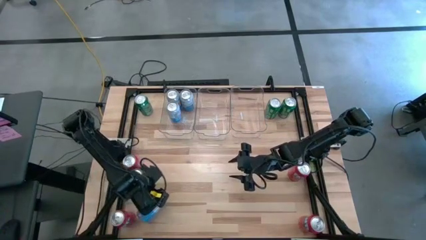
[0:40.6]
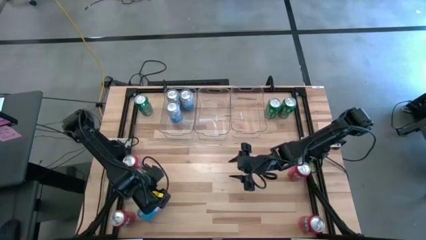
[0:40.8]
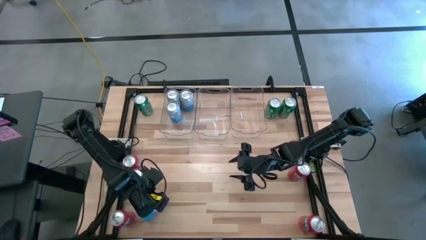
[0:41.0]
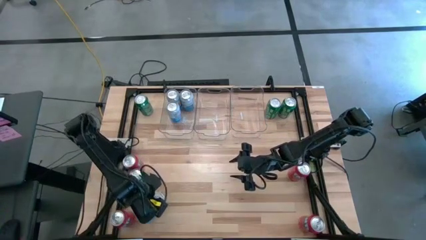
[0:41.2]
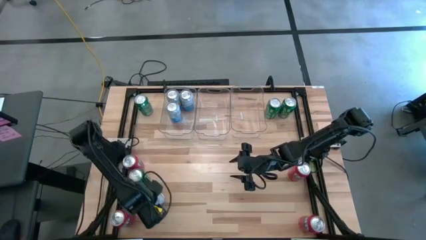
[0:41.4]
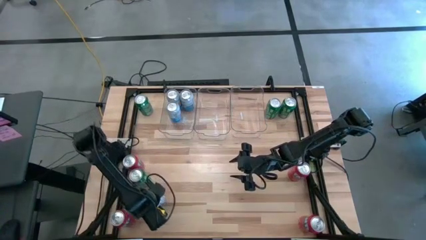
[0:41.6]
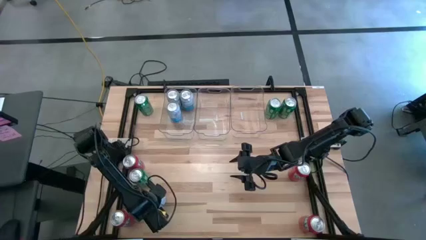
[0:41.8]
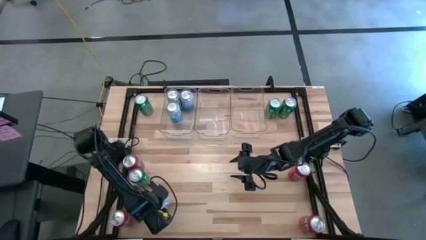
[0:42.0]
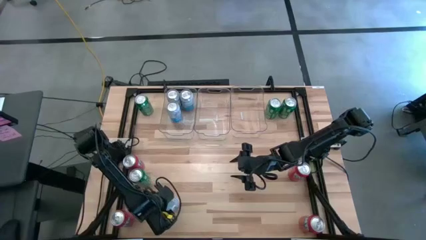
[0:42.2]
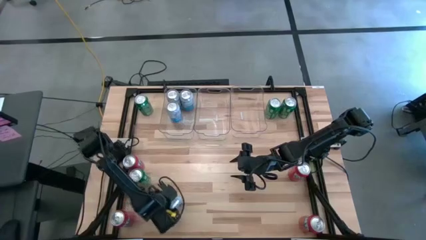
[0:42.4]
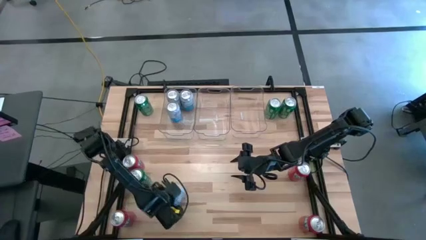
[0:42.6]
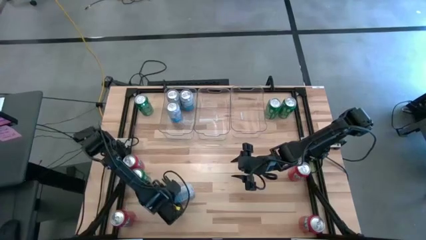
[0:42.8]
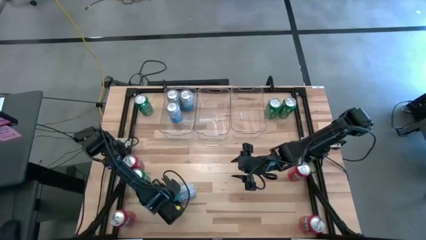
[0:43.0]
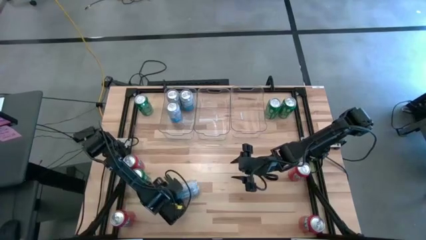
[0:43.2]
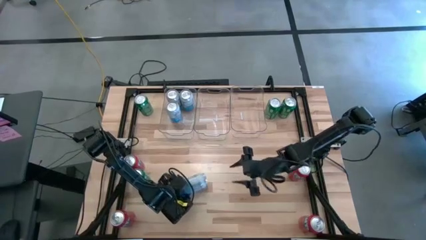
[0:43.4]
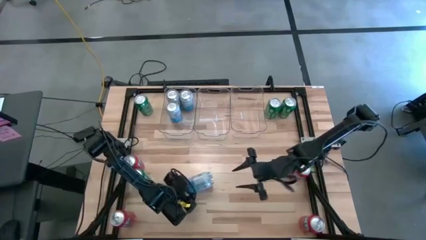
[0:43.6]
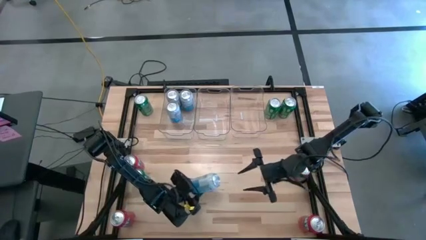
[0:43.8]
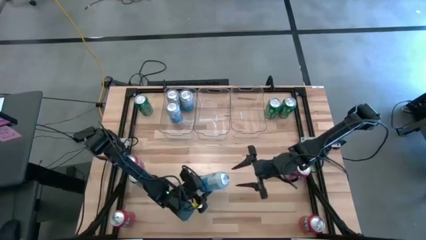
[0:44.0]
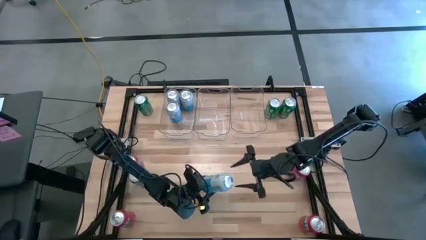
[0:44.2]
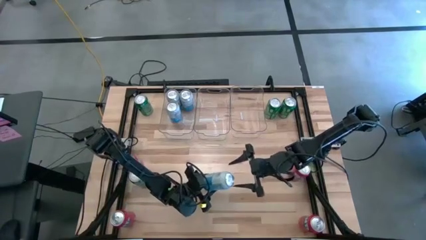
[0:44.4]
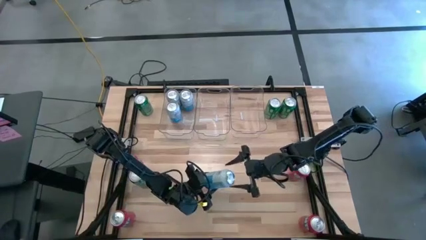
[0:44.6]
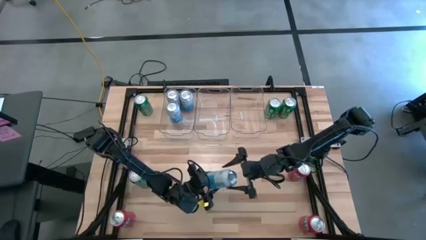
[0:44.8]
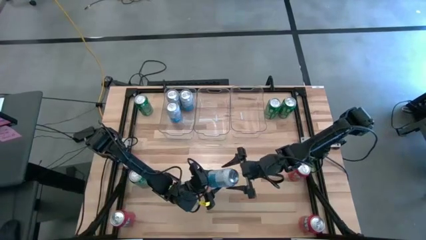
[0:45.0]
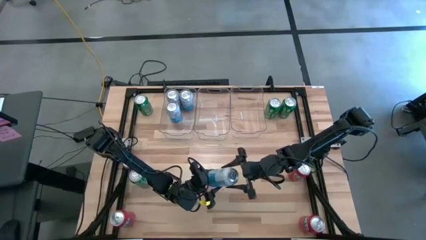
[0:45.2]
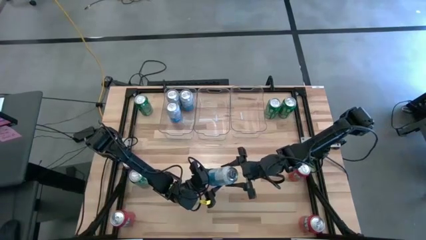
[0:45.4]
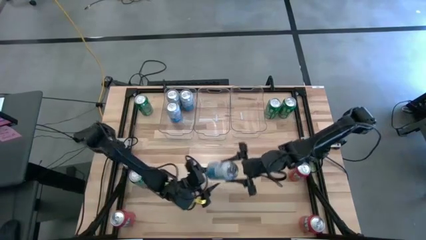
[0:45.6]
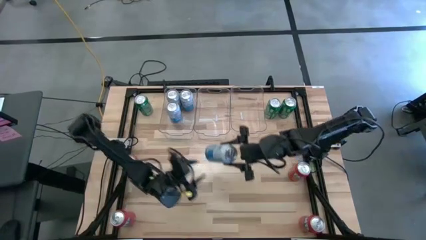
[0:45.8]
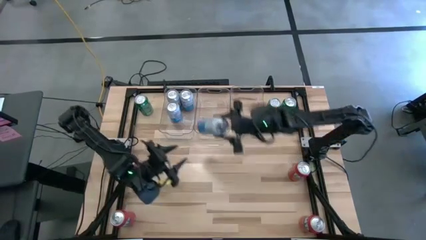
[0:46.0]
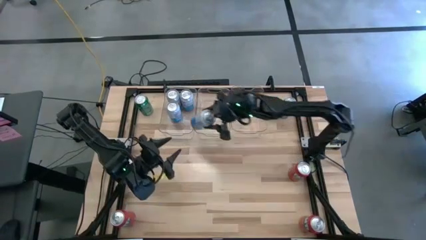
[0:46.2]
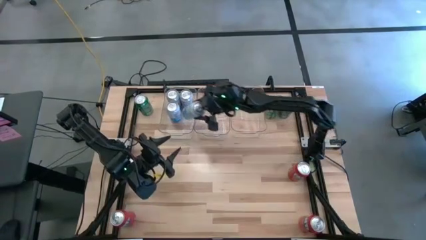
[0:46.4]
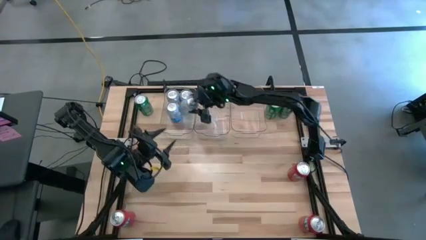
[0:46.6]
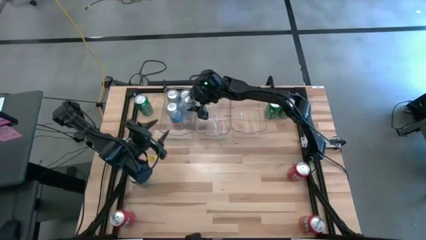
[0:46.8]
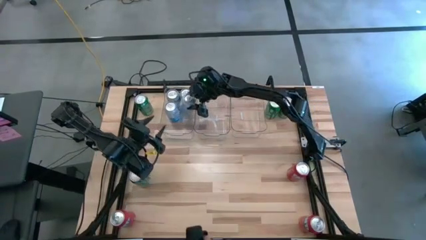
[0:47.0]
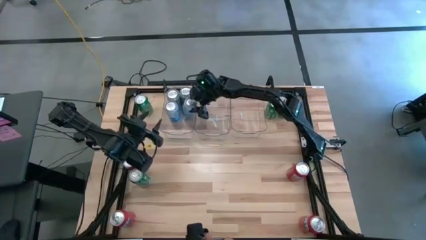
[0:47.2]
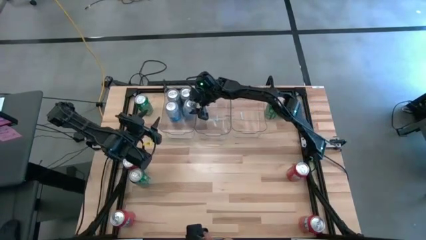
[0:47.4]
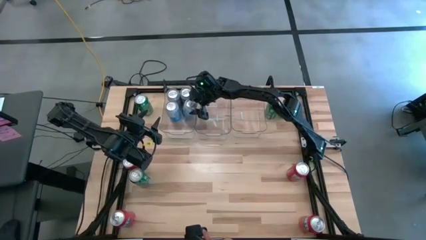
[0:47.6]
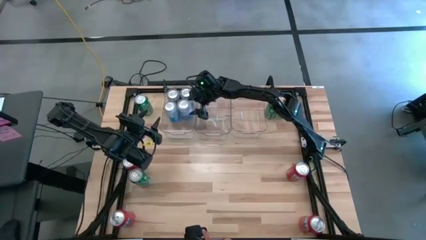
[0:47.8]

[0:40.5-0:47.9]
Task: Sort soda cans
Put the blue-white soda can into the left transparent bin

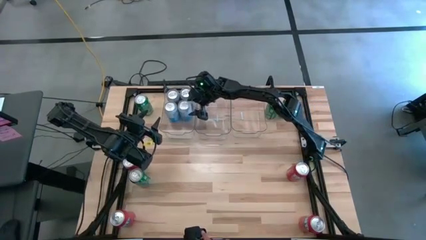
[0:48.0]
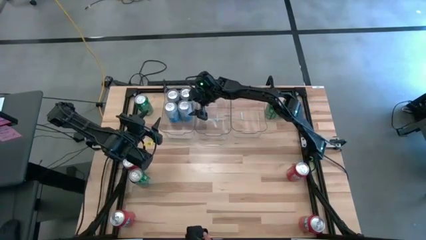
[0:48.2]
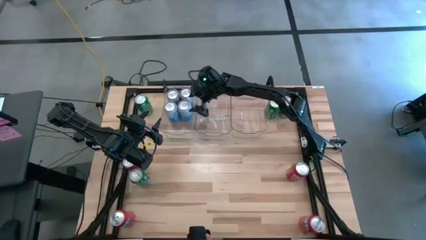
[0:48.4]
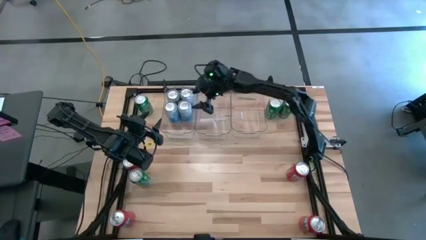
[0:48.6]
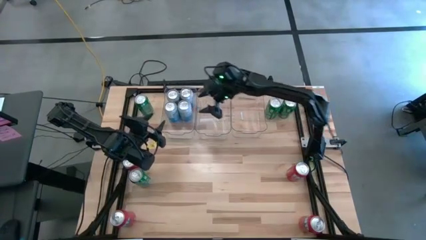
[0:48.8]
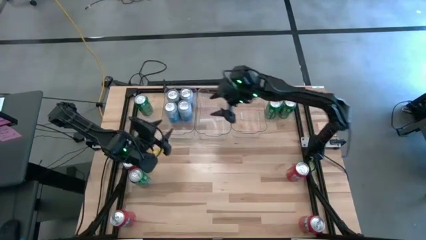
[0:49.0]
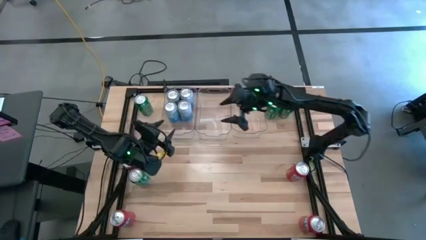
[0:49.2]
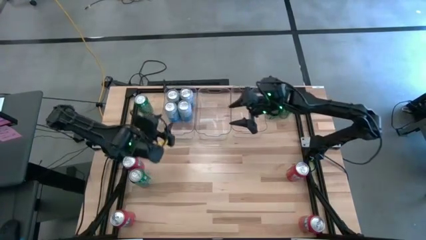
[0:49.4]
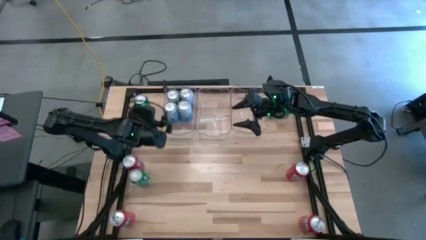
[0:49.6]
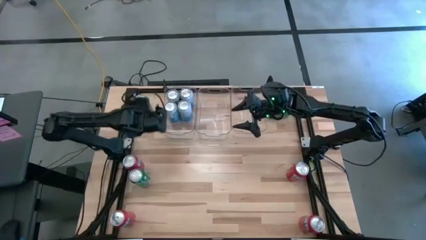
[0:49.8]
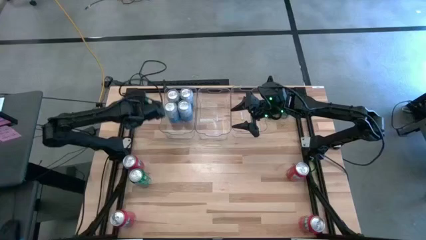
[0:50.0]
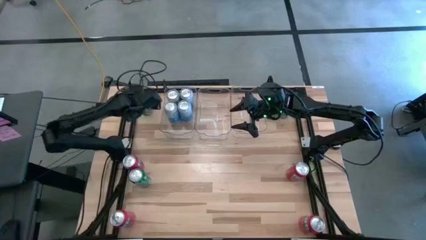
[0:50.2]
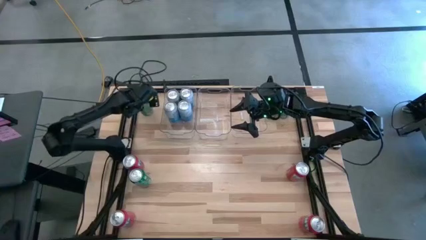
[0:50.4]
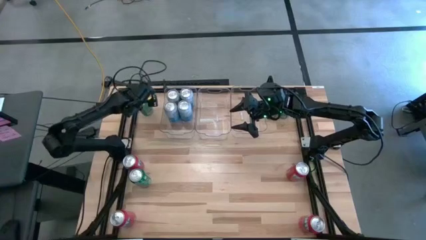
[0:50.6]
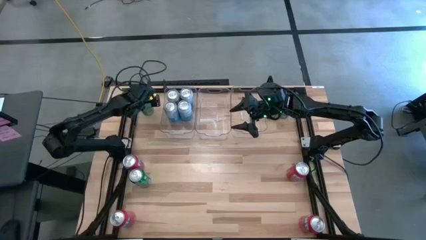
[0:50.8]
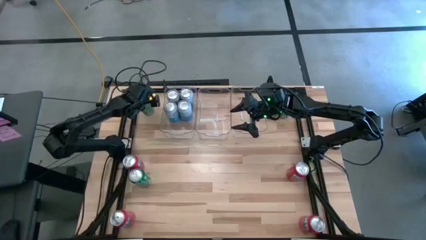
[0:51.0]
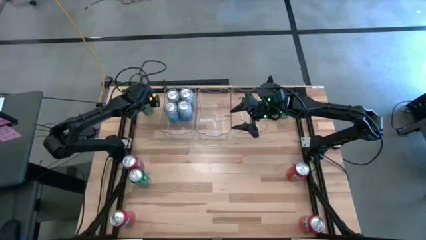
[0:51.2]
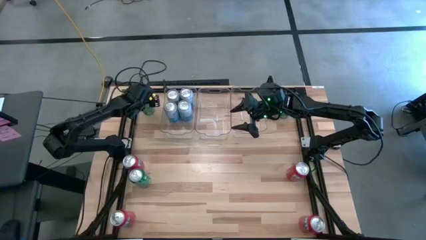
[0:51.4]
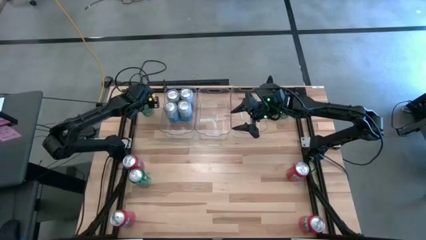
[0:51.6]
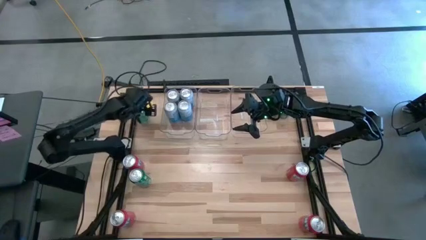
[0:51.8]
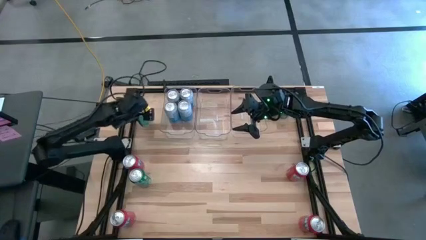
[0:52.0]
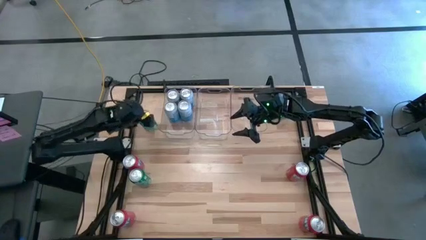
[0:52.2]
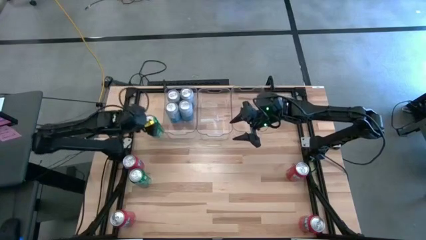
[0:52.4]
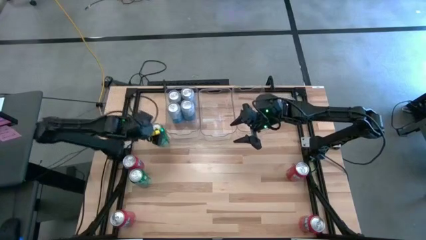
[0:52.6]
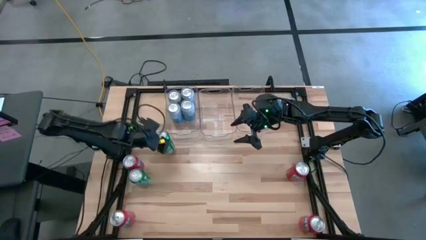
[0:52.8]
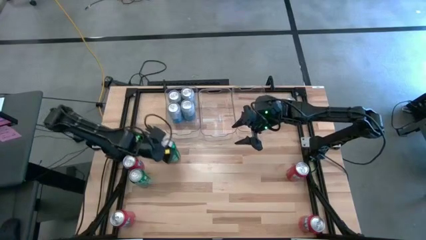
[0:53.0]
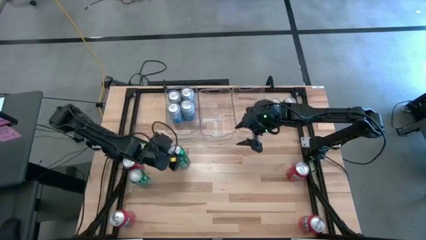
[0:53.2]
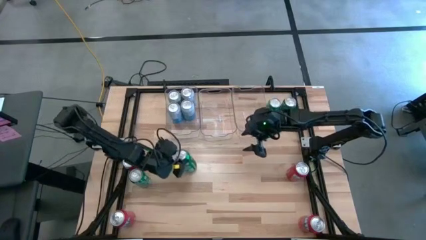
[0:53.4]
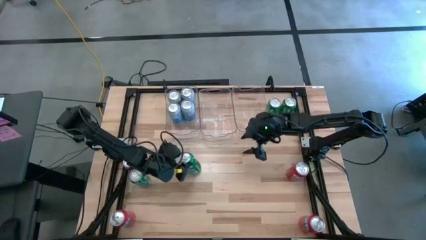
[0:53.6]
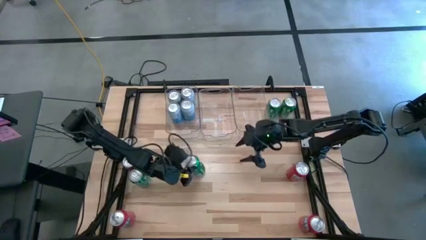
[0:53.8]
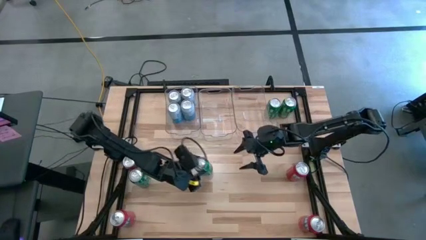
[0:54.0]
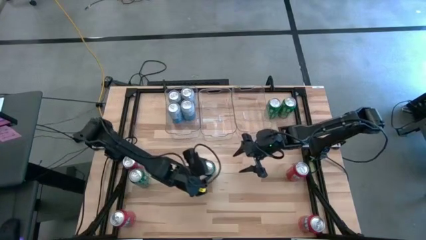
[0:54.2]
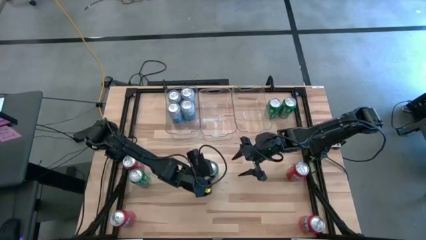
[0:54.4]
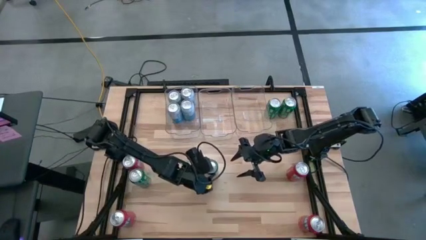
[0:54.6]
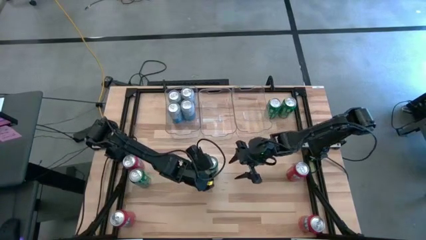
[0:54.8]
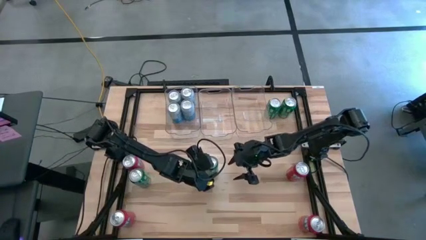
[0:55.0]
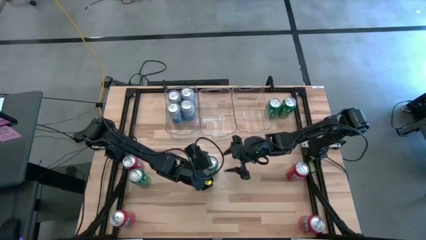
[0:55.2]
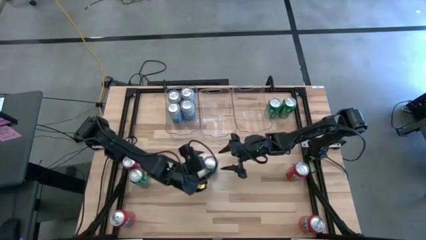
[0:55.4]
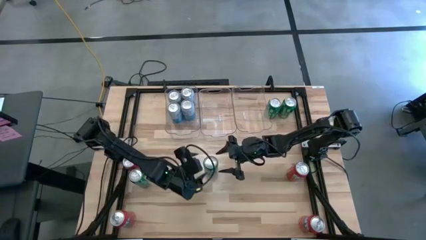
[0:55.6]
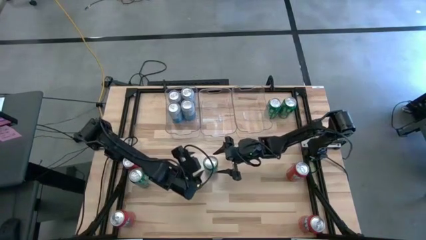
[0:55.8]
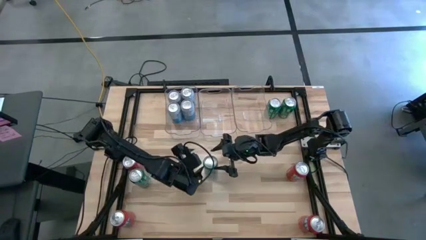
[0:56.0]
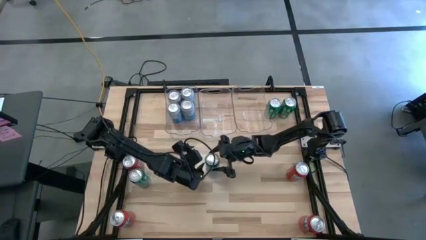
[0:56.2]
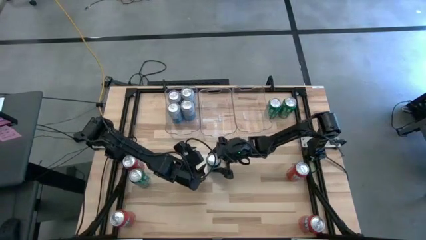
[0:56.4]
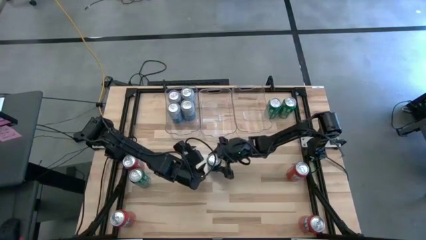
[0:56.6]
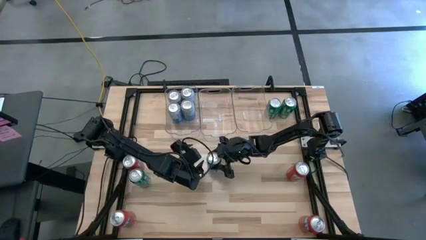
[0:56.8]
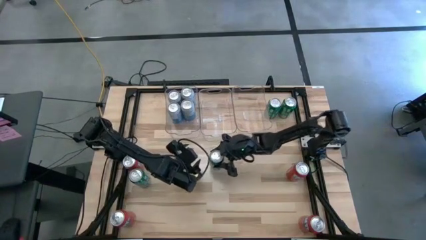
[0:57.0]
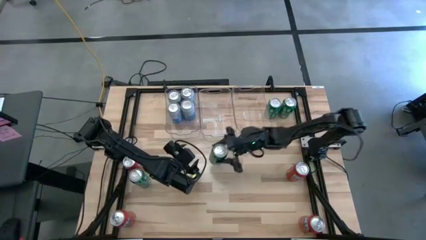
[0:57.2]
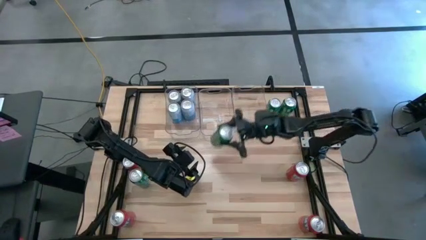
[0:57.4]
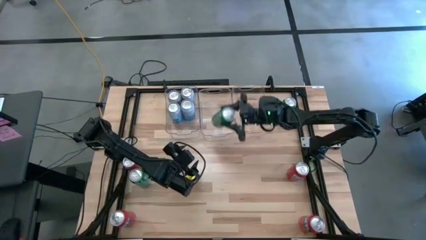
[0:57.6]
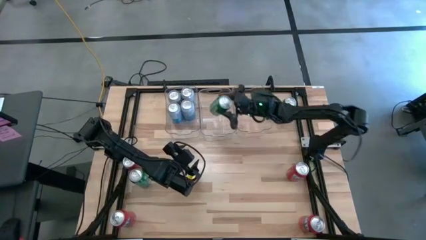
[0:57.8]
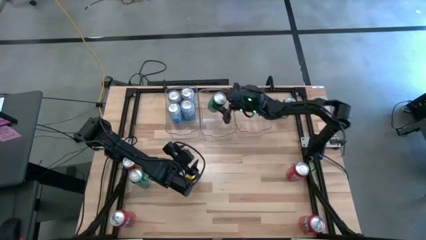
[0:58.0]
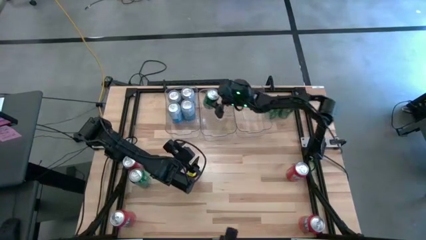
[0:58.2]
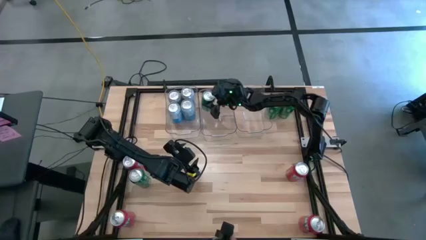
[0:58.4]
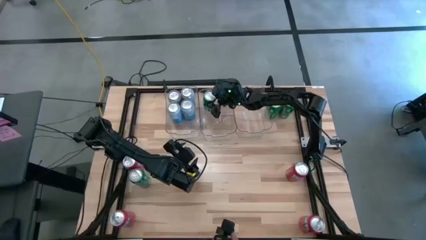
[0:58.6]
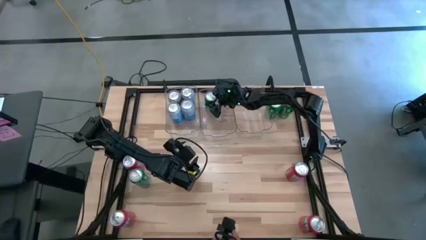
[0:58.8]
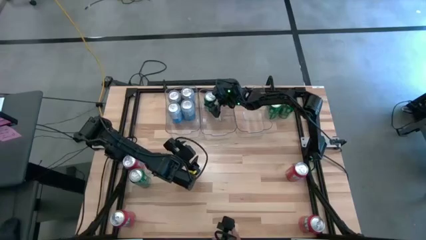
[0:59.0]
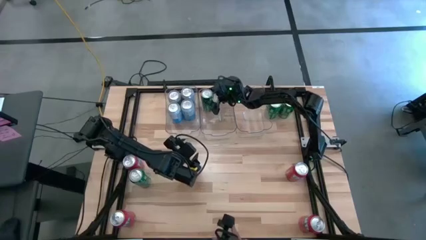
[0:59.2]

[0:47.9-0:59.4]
Put the green soda can into the middle transparent bin
